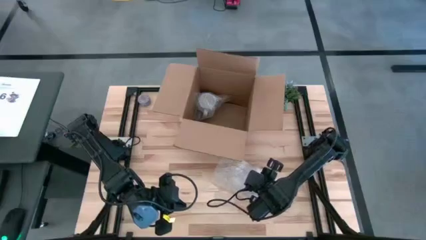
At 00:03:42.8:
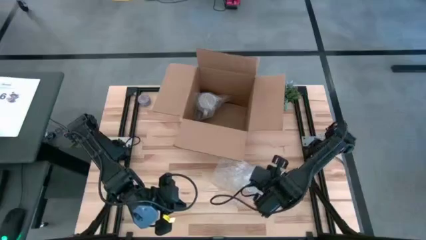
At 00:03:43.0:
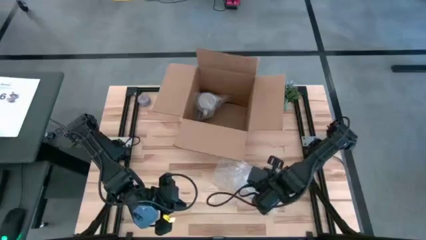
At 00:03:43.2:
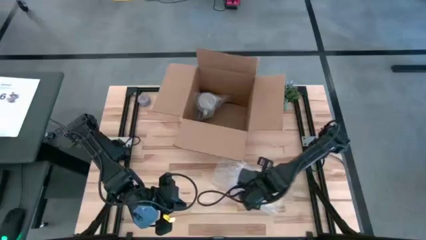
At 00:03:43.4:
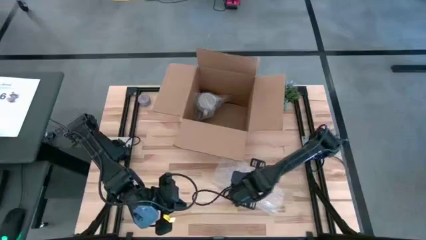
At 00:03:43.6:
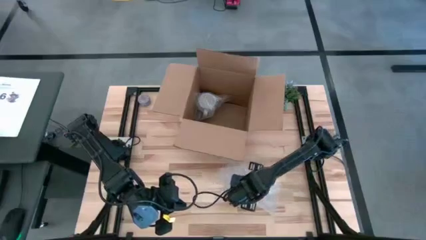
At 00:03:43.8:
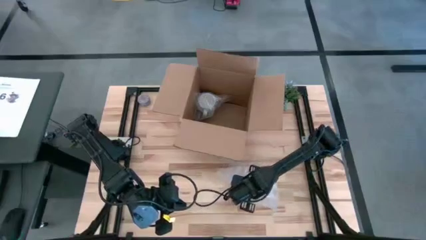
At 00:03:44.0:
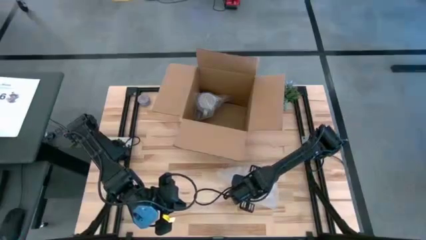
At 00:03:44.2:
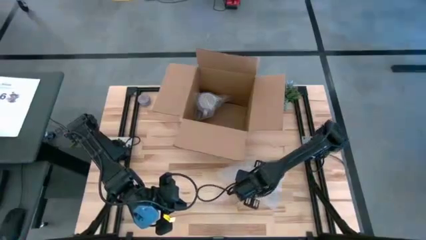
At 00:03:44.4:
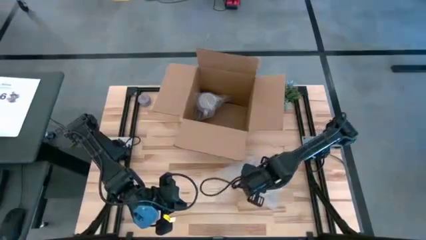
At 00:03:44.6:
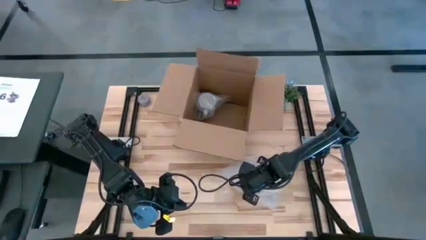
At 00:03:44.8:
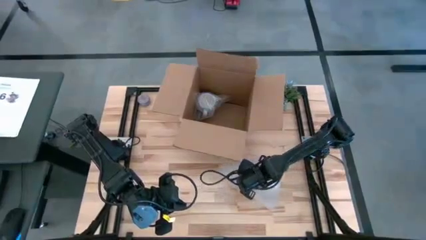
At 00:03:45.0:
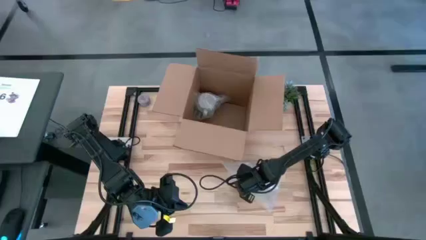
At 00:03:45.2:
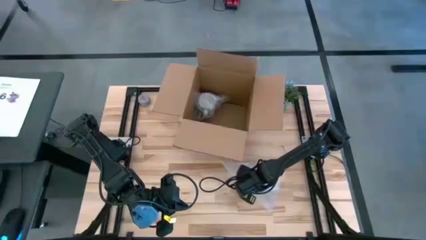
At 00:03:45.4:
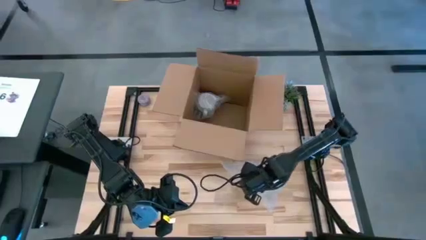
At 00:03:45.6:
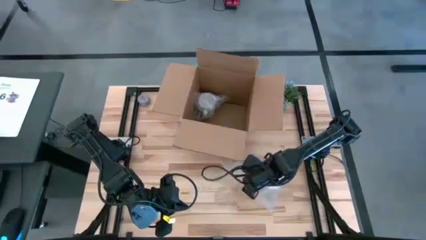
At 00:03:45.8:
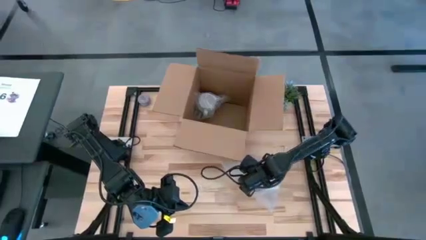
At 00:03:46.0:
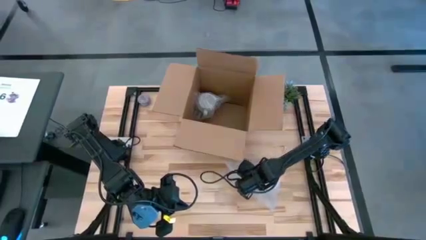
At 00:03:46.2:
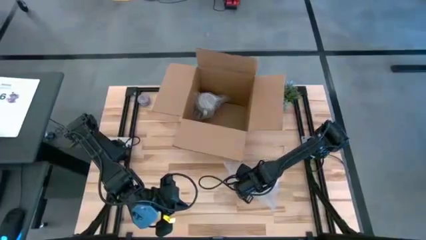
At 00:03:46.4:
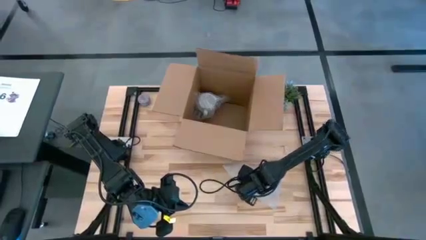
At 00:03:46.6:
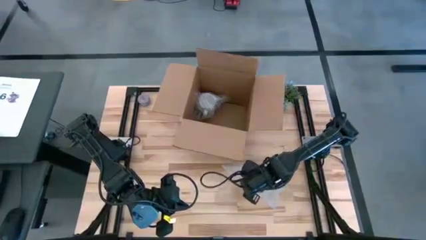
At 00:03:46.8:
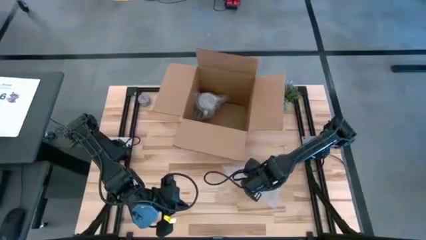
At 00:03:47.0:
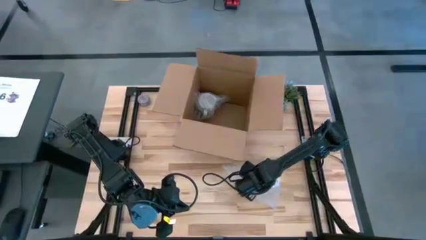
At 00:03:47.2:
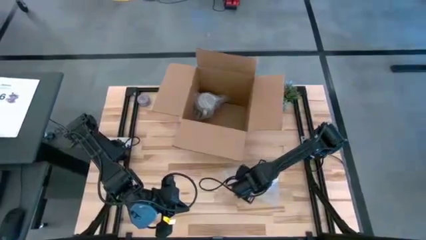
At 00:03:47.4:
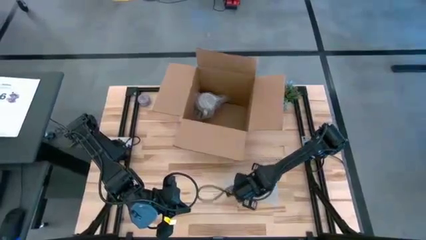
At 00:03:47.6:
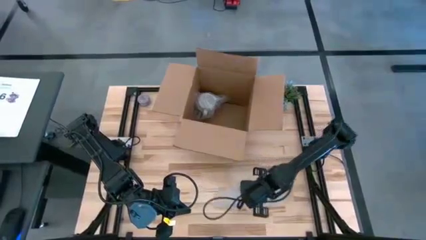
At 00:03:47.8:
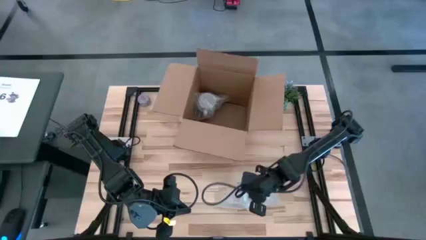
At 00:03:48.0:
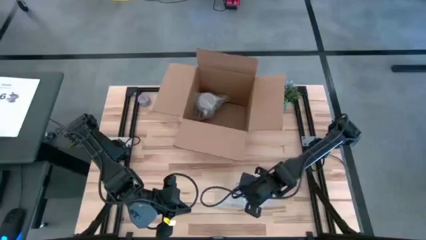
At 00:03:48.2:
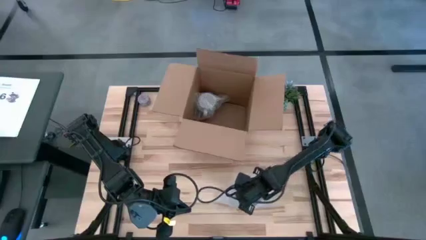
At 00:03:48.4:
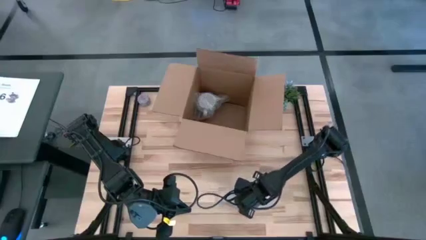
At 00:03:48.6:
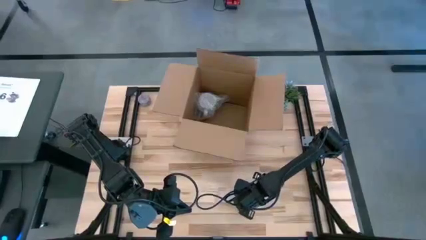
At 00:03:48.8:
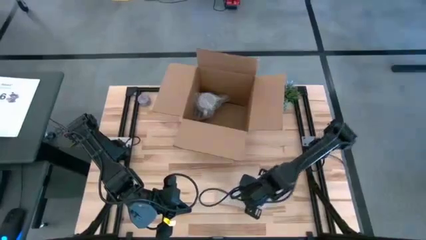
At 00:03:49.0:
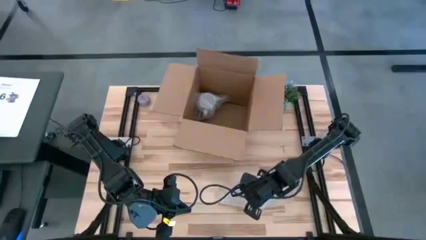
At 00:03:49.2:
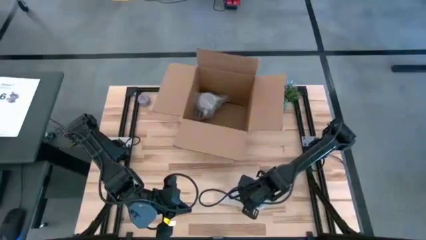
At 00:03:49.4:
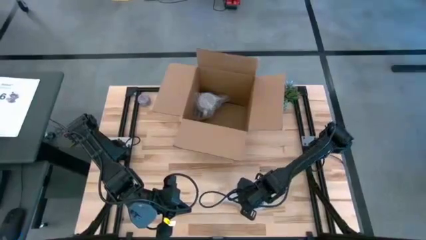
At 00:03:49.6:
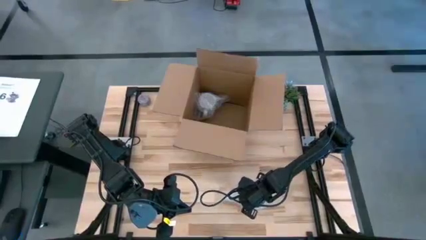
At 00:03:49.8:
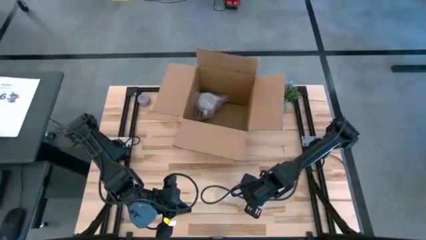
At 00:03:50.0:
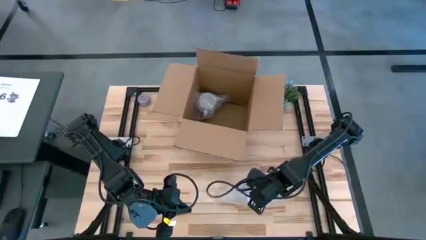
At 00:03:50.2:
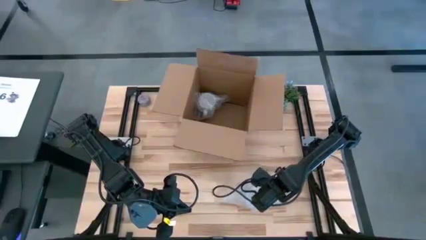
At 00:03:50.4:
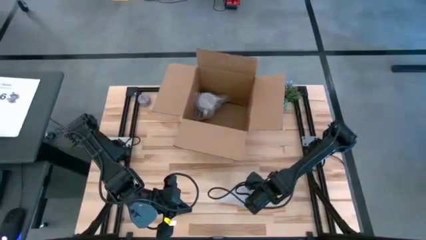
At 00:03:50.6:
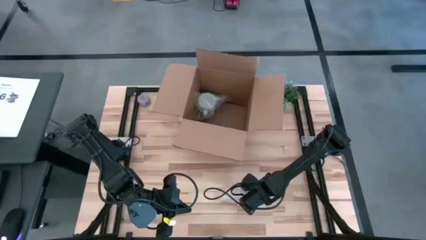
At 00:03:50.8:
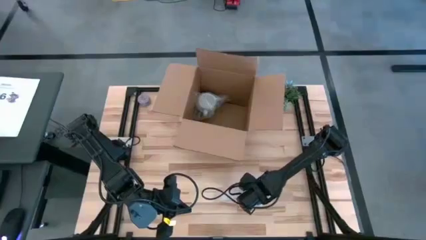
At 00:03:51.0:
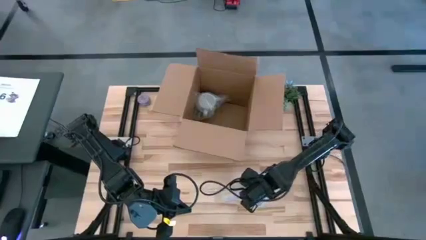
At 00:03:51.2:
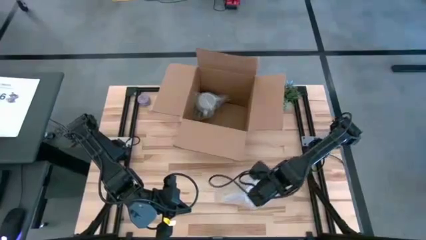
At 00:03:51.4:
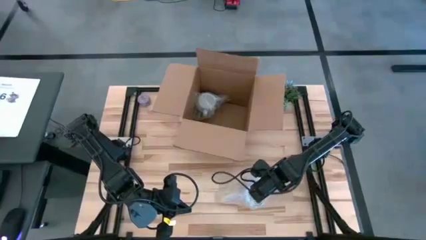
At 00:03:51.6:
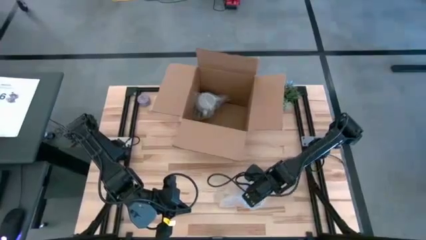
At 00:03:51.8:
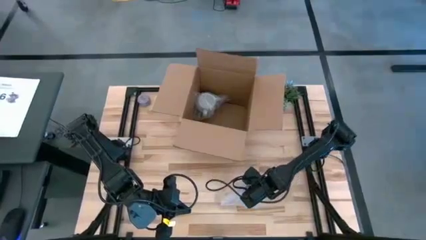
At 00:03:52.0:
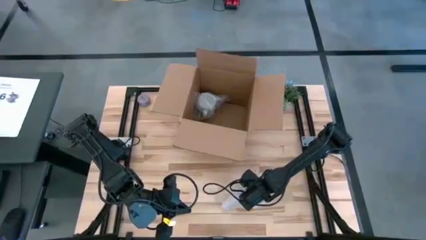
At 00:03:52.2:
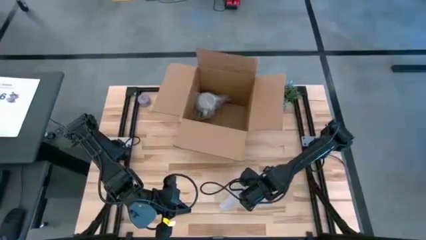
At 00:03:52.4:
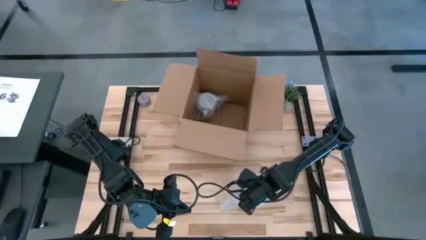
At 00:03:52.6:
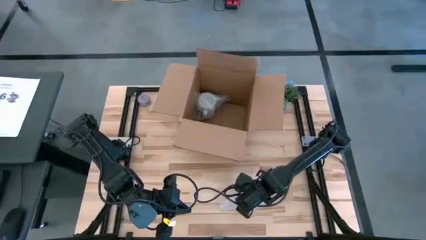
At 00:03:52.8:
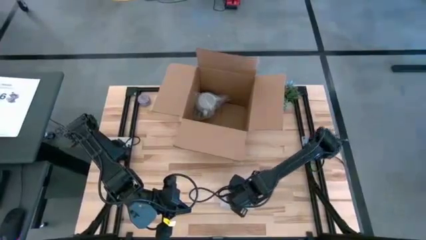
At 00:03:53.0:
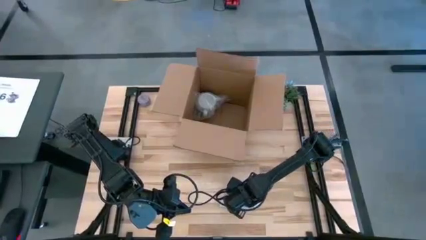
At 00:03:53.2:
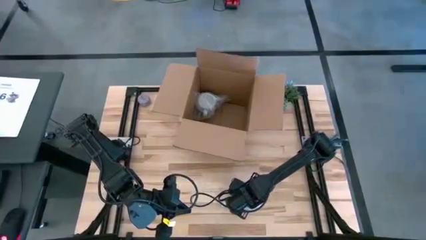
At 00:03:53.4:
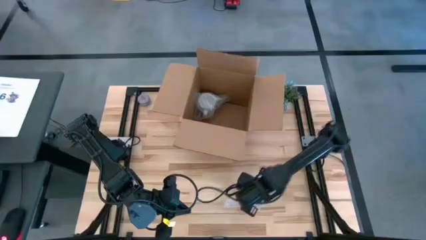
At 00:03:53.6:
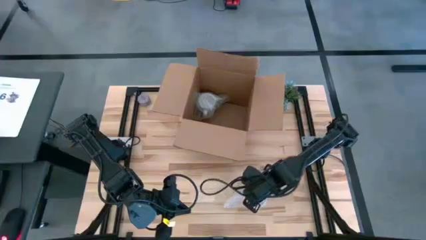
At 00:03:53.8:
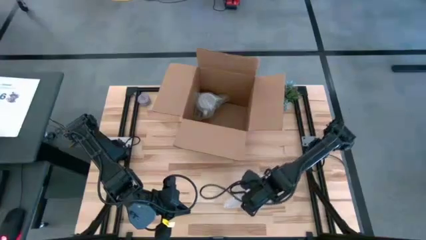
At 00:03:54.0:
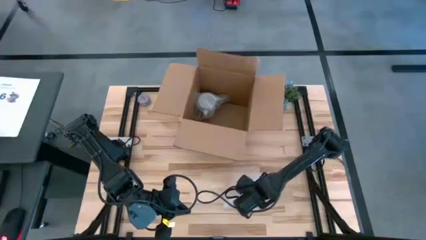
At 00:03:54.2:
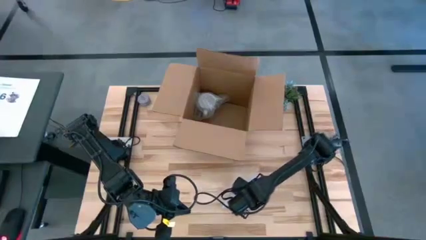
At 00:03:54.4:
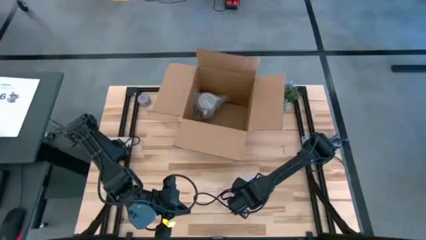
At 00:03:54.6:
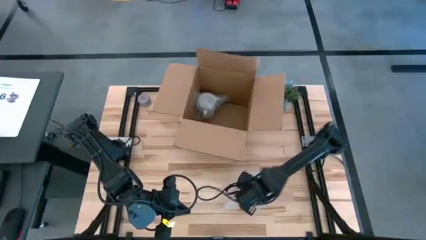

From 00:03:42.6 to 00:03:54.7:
Task: wrap mug
Wrap the white blue mug with the transparent bubble wrap

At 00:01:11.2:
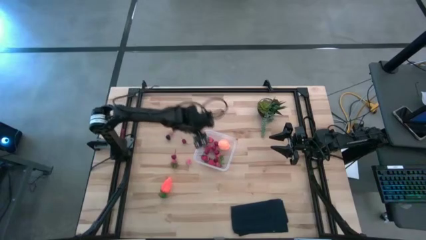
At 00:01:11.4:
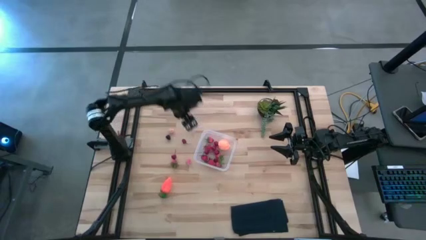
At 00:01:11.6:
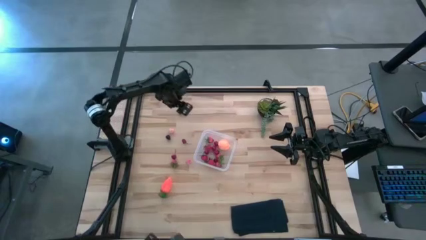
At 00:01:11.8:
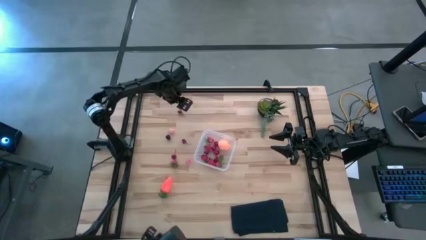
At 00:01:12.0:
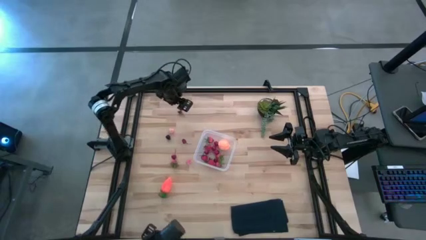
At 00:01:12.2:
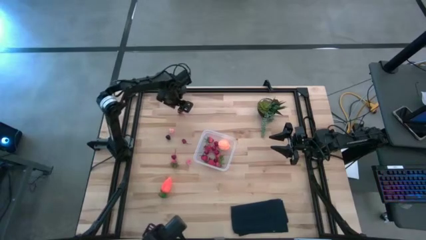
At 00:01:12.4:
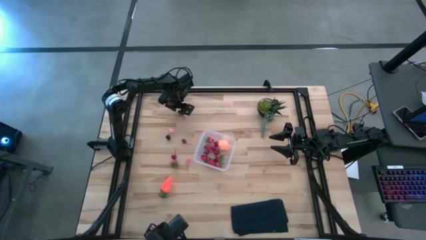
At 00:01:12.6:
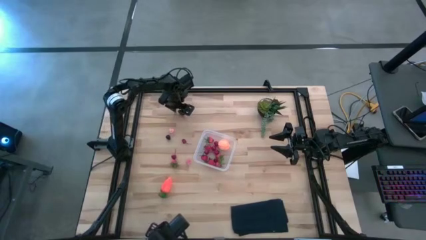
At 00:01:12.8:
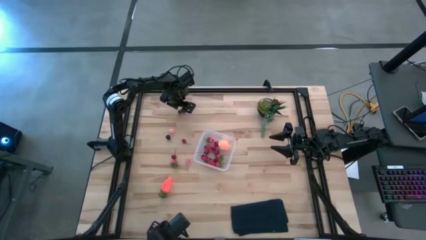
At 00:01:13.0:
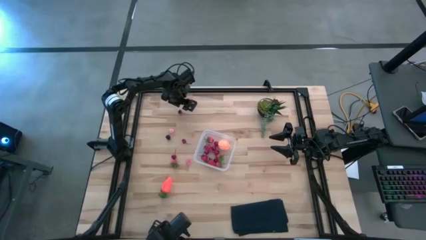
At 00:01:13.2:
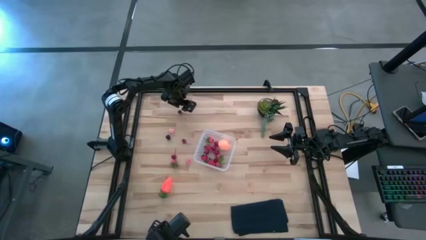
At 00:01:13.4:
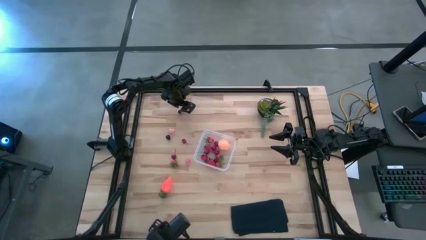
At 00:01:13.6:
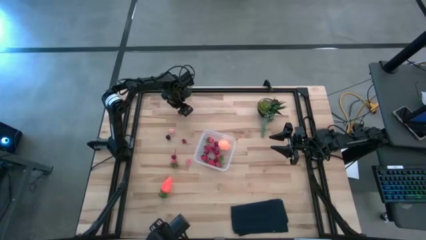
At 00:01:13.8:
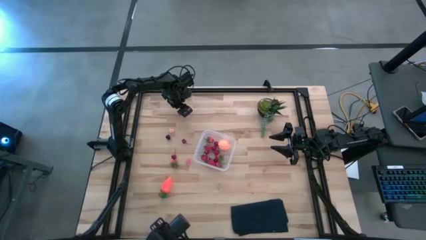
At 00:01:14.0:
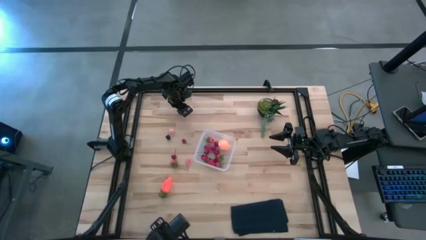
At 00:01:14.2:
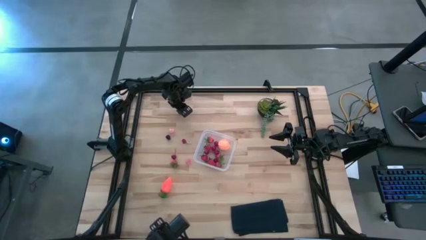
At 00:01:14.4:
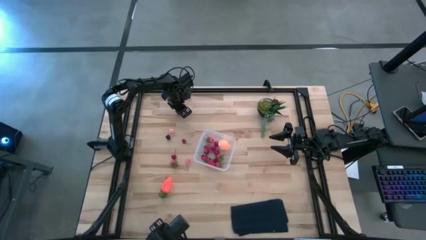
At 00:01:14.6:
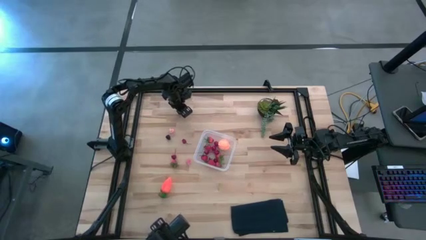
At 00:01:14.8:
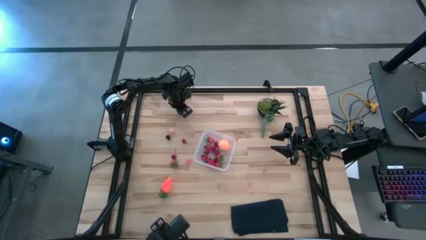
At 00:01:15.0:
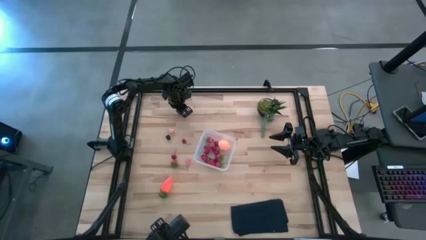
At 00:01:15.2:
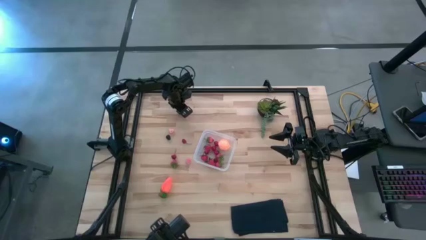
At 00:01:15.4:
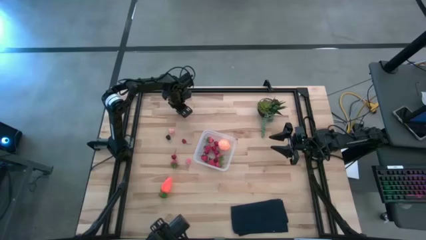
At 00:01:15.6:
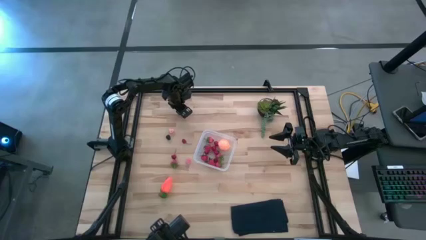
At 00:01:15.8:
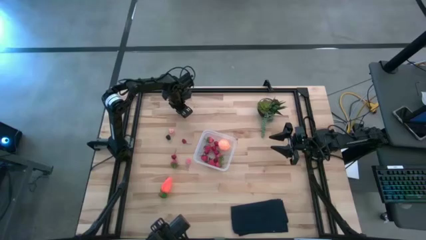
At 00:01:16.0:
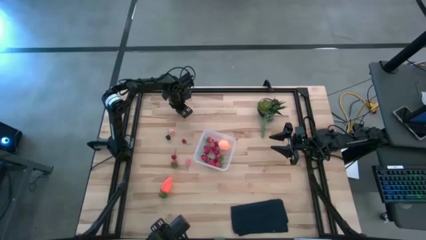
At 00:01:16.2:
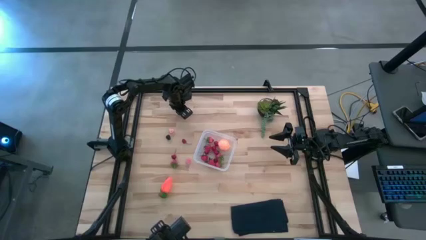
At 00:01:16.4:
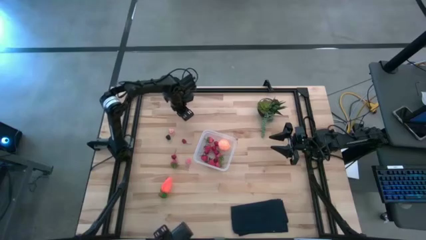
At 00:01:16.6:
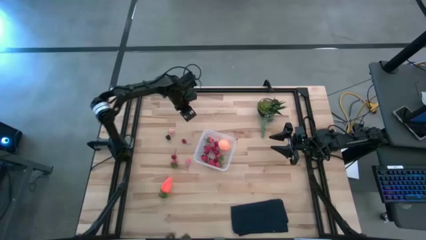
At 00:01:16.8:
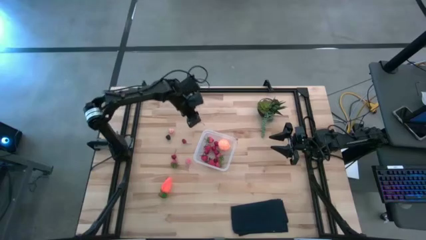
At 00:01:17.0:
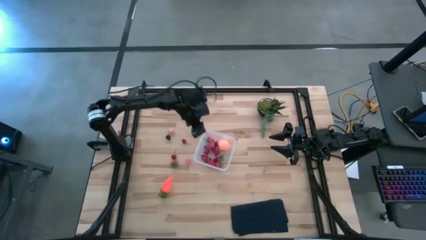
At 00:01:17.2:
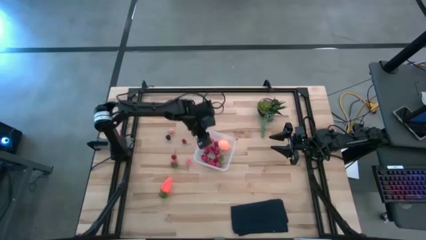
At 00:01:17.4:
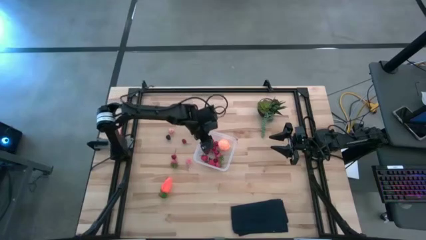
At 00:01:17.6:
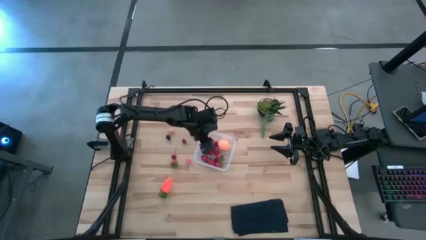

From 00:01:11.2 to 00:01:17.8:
Task: Pick and placing Produce into tupperware
Put the red cherry into the transparent bin
